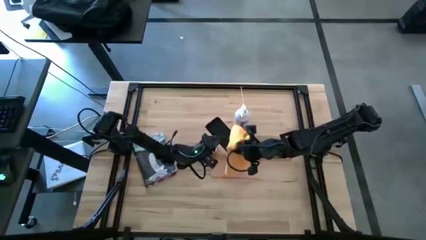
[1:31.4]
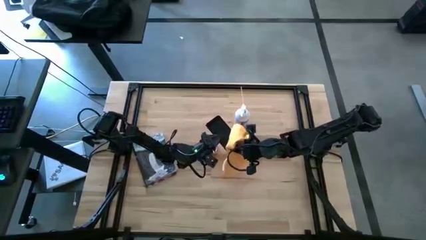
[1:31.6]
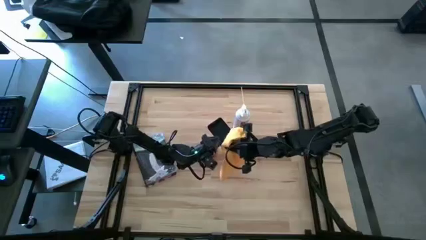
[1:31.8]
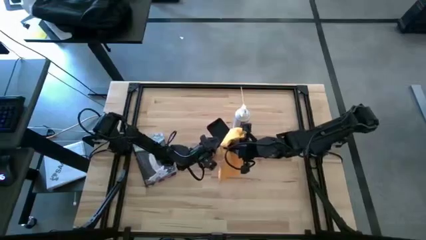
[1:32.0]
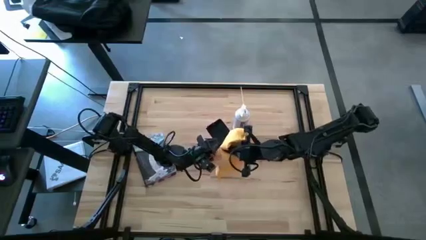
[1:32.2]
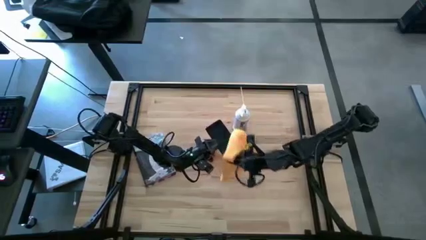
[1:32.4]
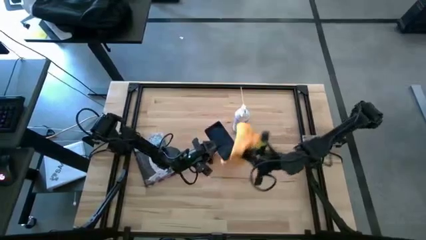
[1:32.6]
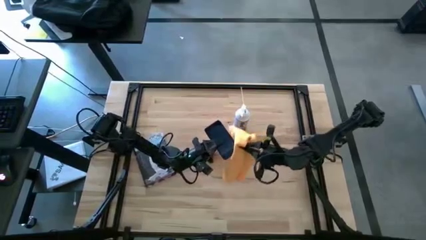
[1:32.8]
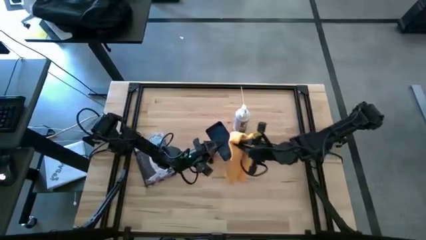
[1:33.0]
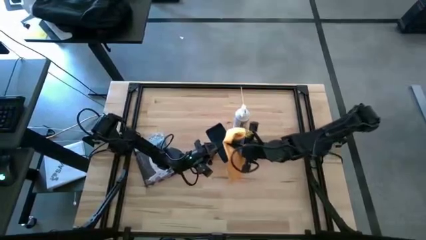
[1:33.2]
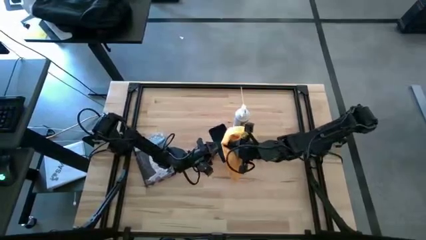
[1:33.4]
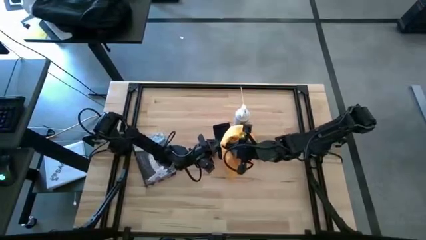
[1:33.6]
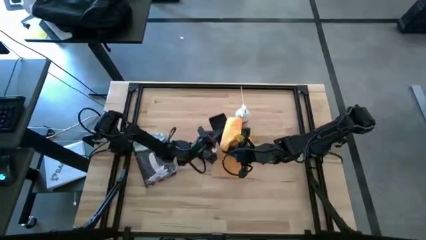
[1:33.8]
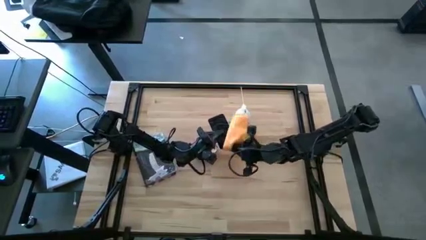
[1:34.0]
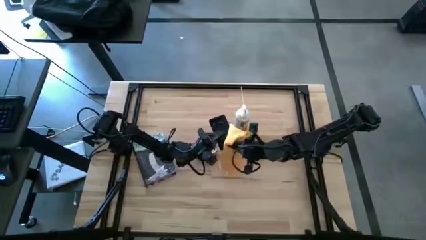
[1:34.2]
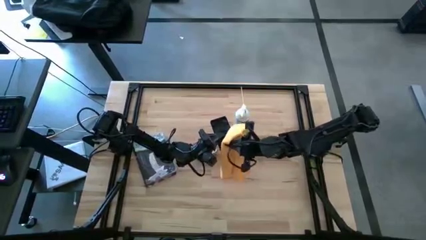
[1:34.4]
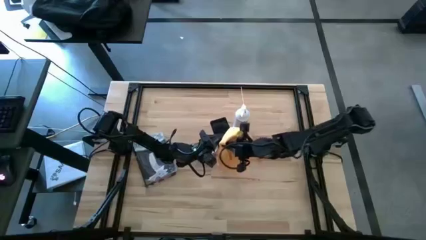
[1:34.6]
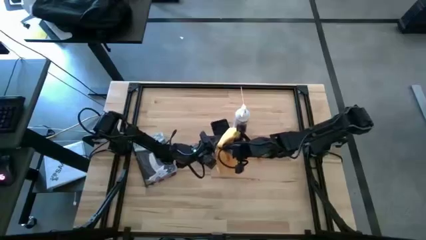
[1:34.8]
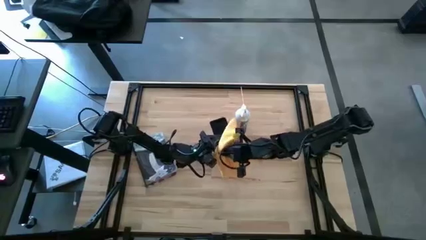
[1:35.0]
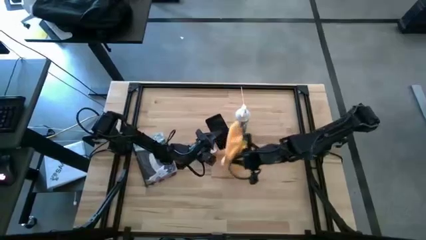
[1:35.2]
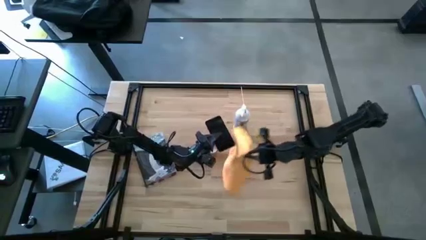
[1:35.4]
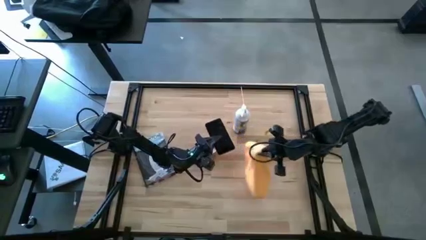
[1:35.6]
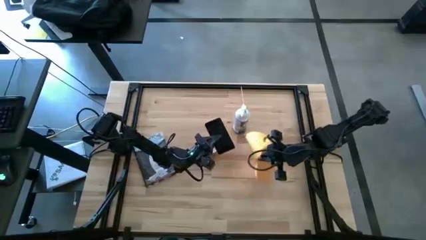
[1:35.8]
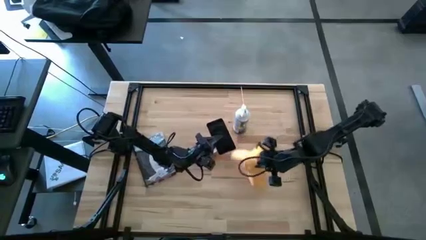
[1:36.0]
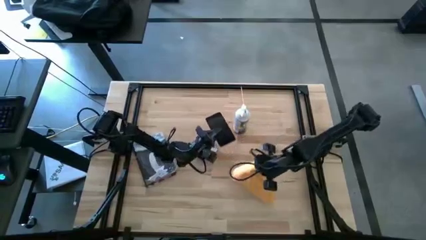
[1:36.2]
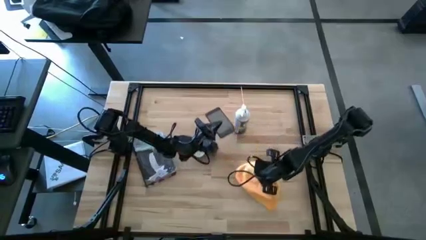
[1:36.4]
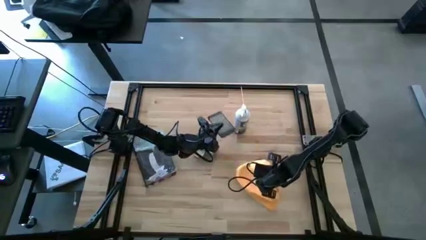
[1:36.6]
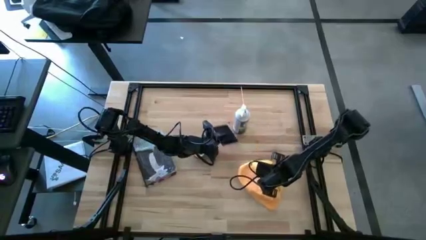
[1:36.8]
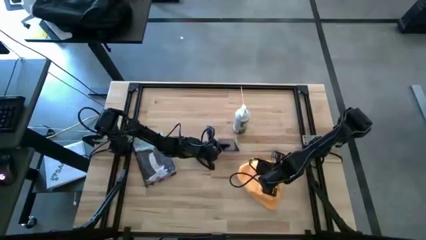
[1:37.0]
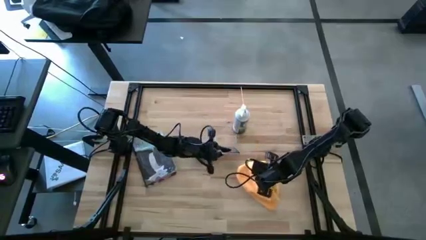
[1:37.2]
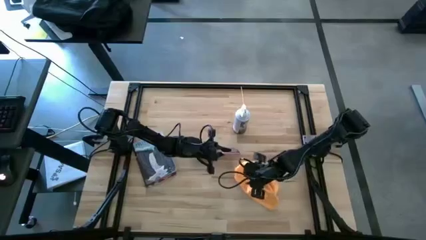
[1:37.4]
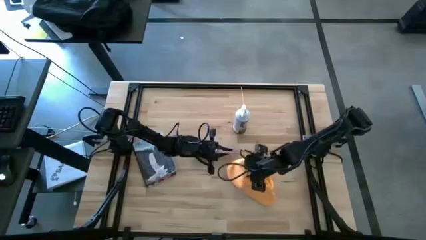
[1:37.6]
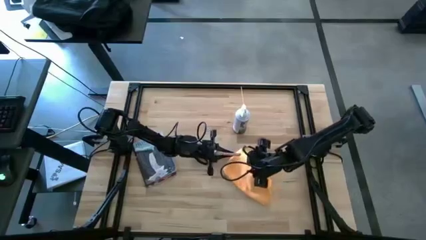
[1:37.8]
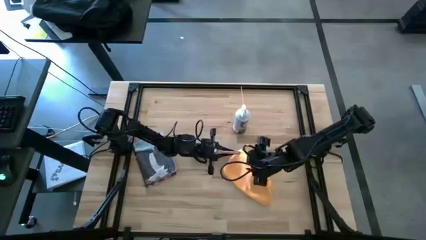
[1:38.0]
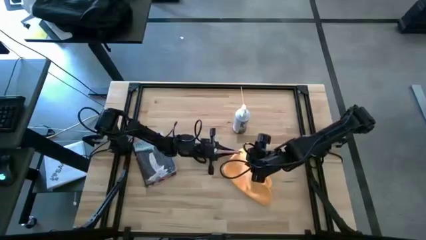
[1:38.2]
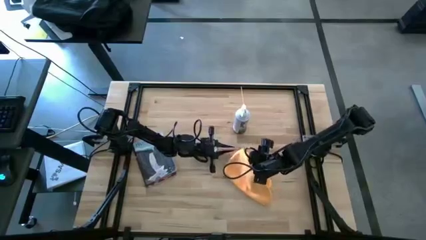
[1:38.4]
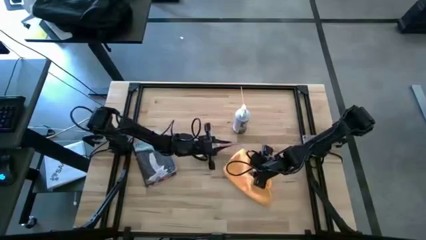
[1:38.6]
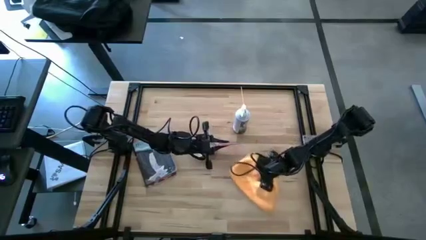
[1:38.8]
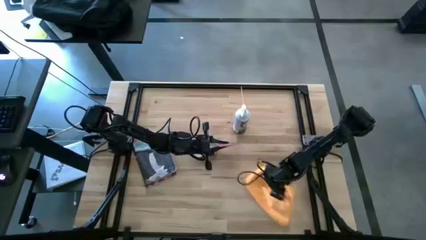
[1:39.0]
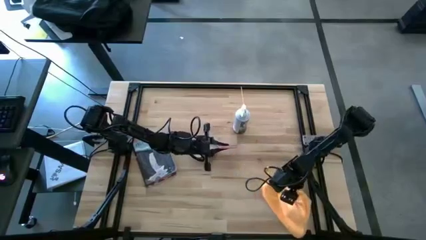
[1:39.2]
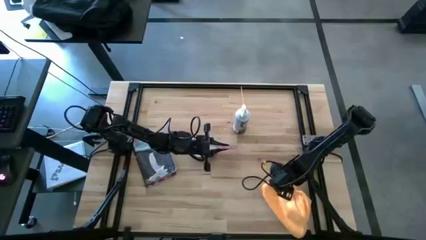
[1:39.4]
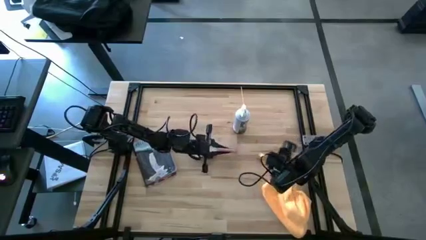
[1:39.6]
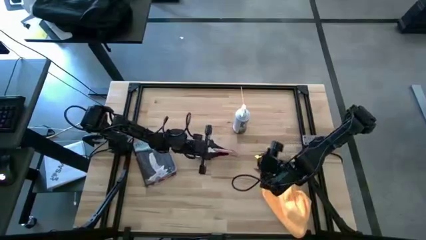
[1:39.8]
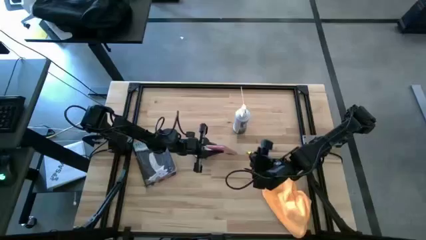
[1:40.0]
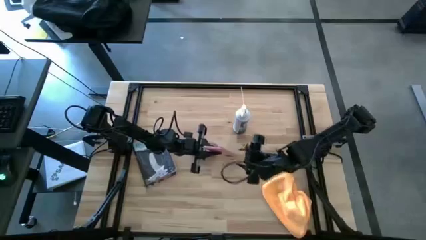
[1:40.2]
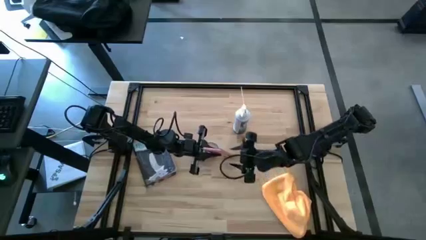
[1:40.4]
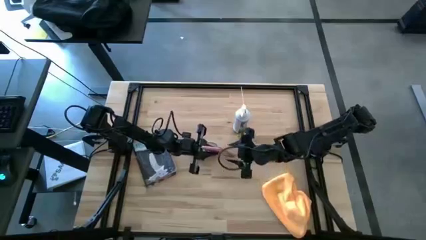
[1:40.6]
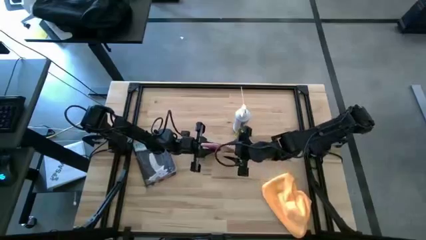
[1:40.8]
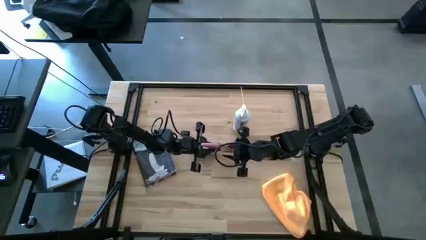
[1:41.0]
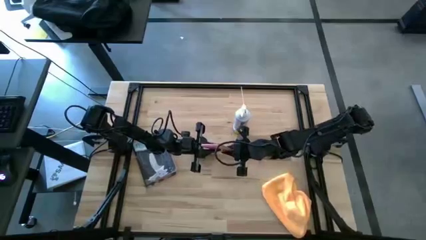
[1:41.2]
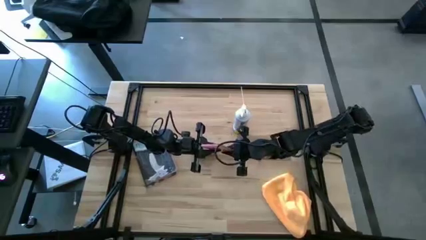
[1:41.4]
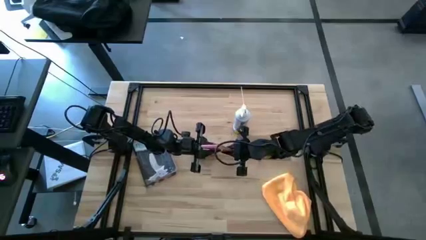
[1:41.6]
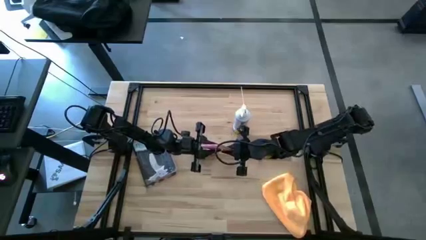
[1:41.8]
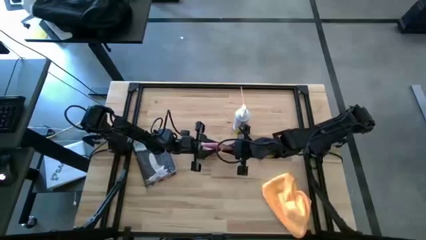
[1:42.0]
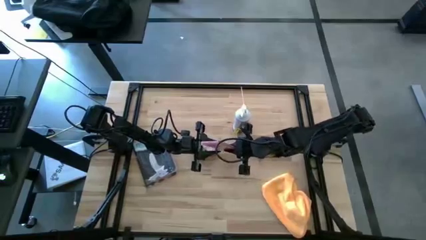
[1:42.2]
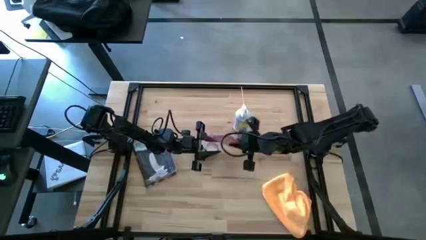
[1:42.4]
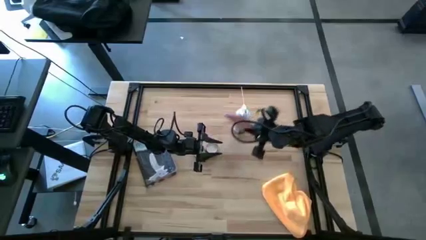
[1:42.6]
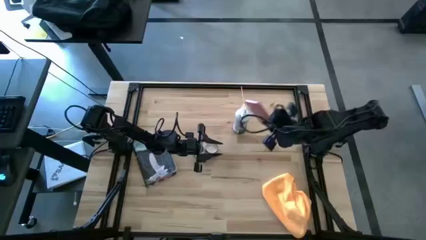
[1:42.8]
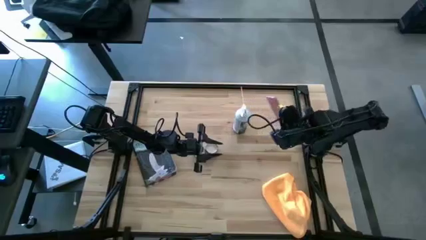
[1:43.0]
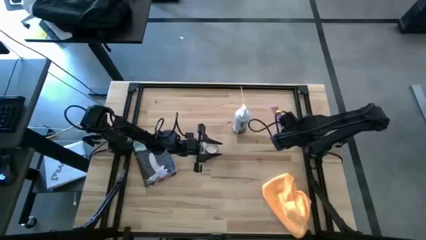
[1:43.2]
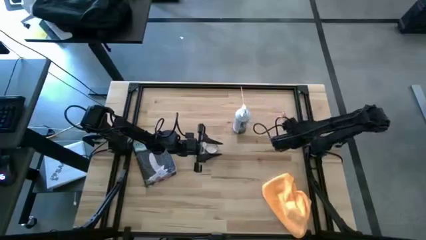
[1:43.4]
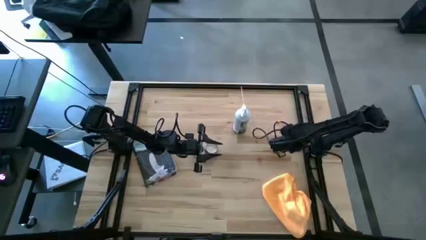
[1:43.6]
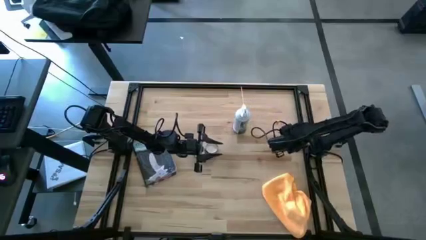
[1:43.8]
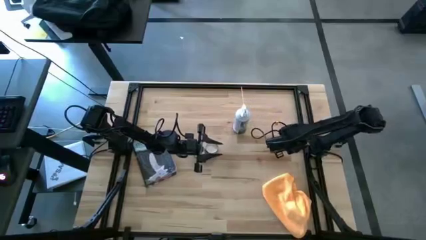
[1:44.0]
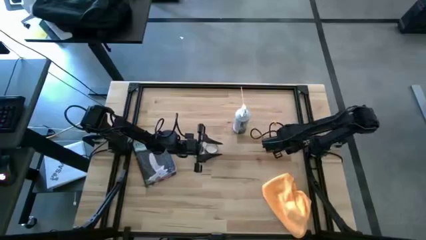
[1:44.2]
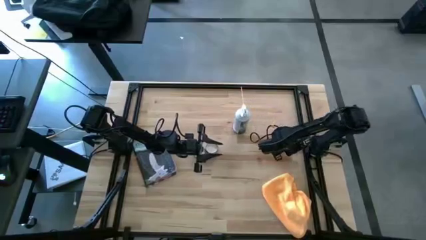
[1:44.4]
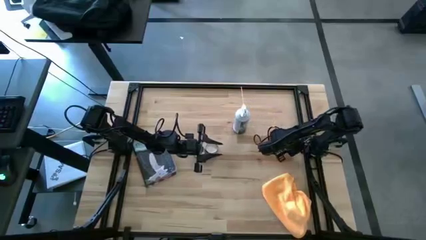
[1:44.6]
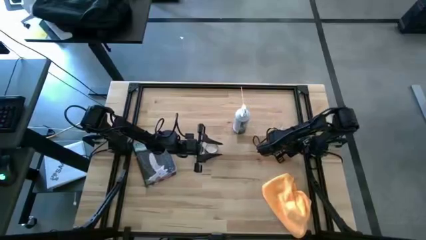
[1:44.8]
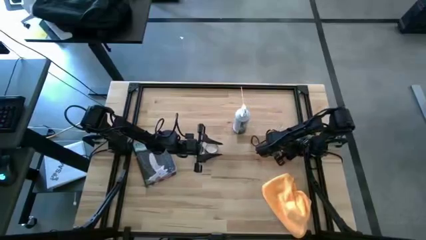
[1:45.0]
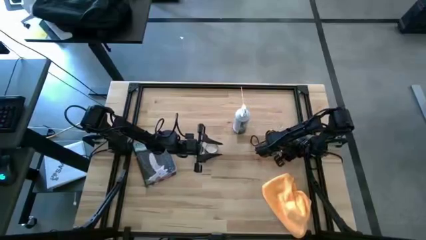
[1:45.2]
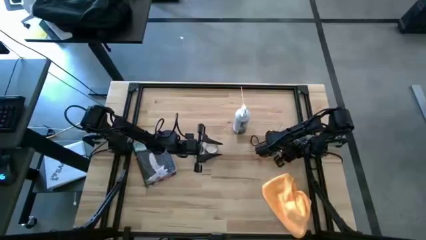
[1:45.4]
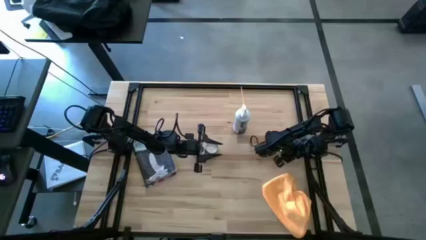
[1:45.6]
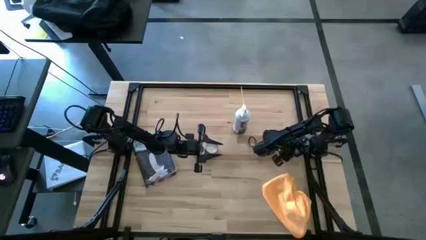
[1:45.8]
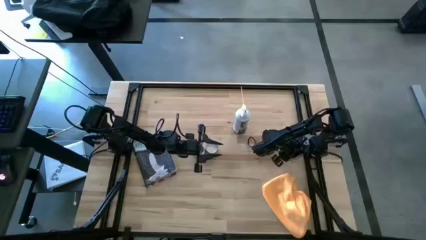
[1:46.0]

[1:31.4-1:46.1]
Task: Apply microfiber cloth
Wipe the cellphone with the microfiber cloth
